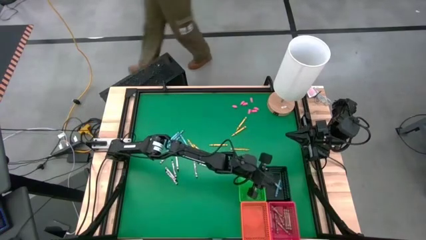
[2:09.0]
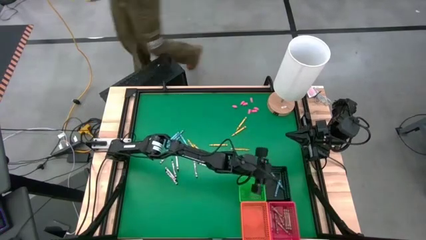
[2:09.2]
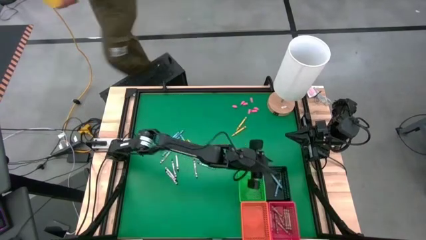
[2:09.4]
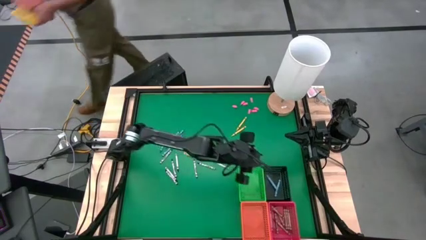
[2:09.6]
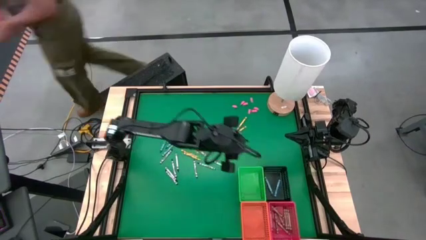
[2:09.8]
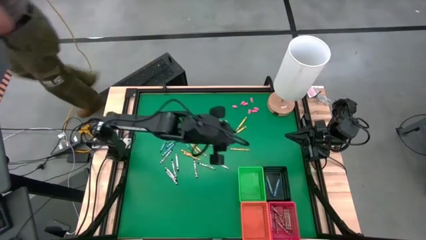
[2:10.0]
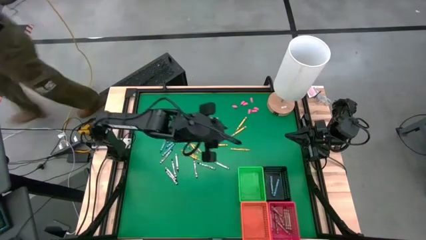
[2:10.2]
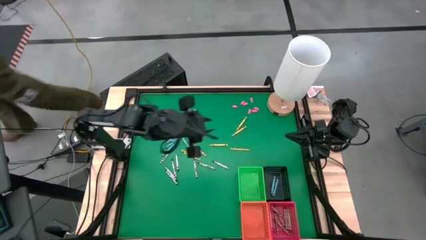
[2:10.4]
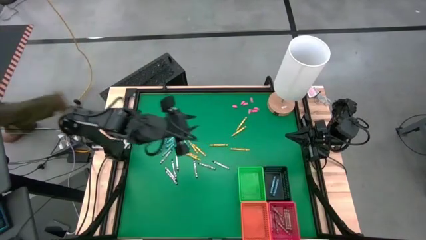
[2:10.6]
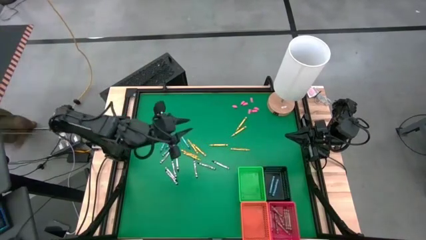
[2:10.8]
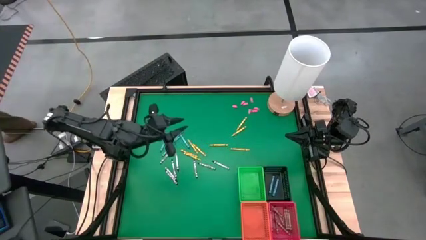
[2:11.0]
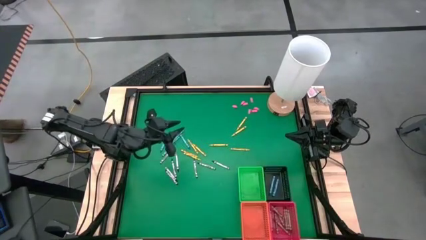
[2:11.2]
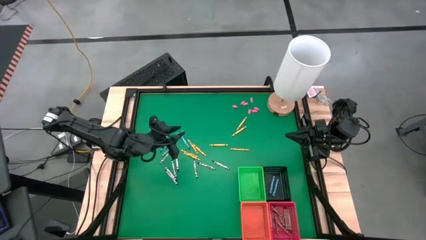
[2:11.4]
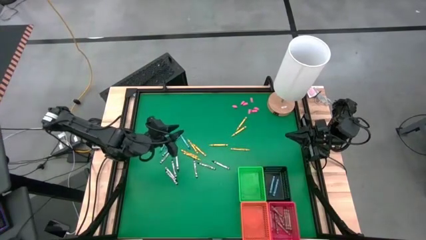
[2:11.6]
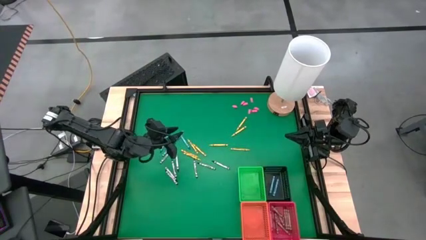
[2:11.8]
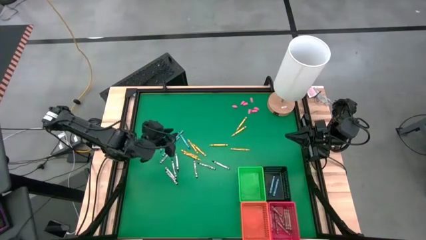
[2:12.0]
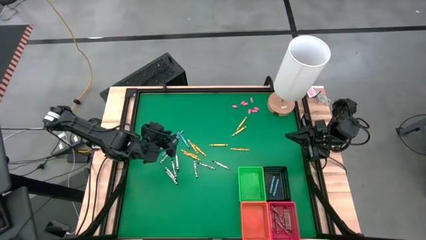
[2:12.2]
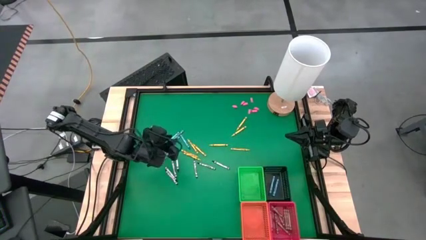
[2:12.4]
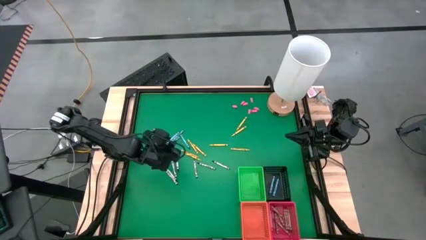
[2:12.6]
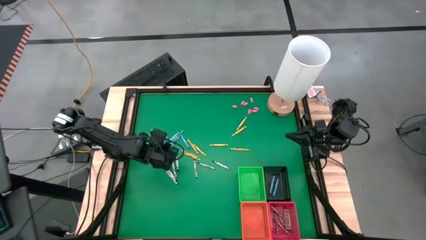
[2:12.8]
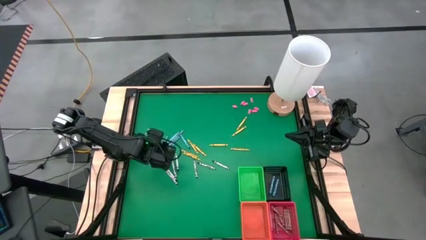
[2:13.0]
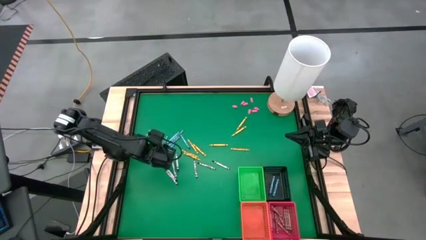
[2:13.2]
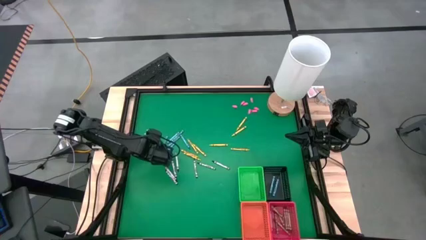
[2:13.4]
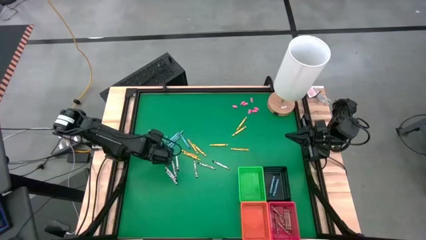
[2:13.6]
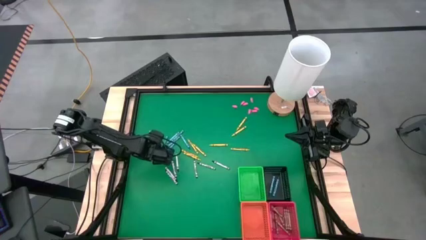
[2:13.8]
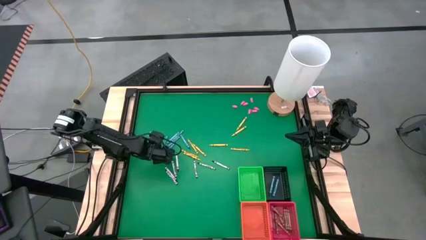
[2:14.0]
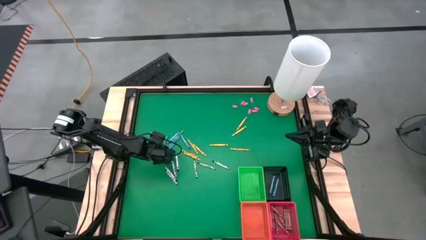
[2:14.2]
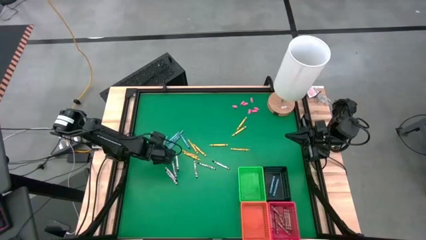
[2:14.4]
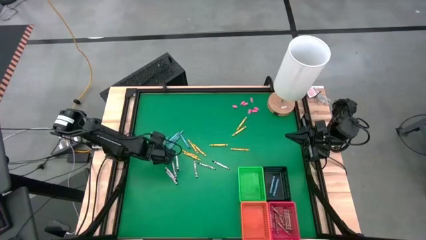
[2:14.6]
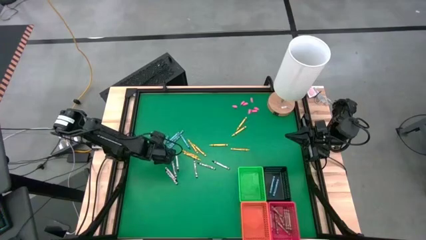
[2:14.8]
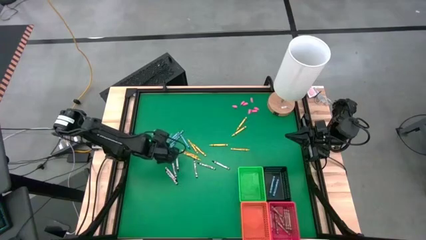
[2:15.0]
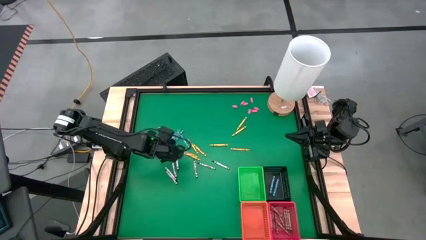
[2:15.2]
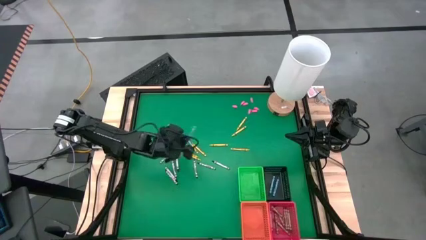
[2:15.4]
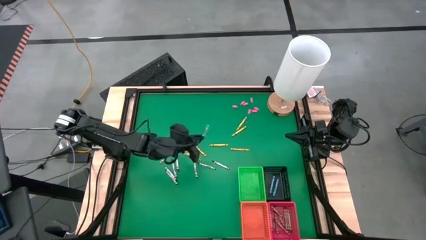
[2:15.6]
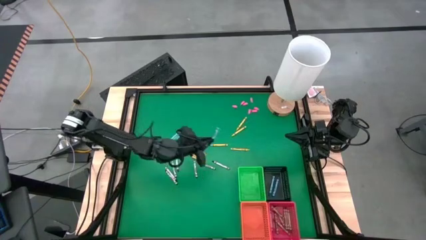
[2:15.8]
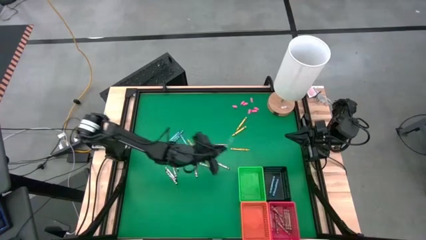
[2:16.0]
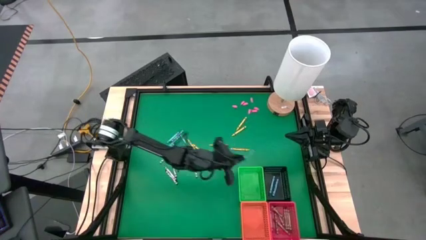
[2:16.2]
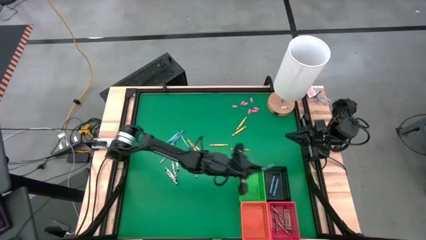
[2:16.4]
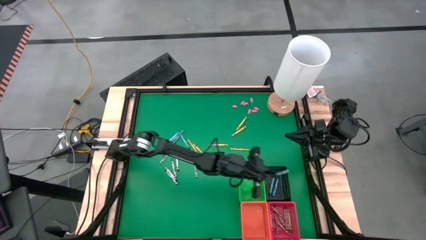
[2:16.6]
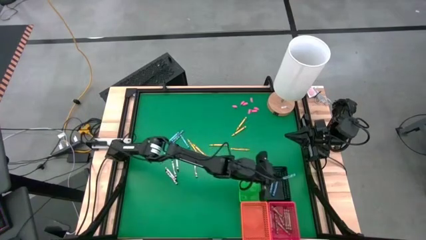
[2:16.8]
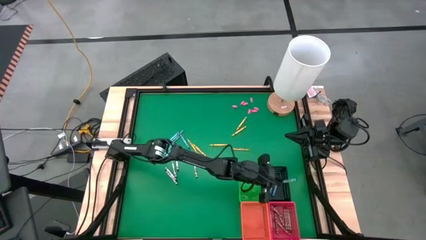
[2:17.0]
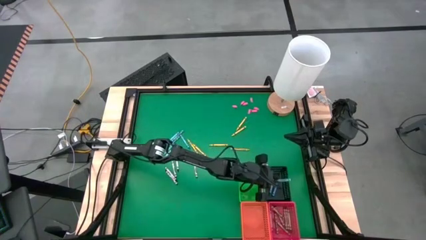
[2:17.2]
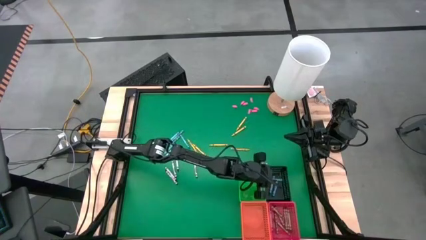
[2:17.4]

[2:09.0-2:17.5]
Task: Sort crayons
Put the blue crayon into the black bin

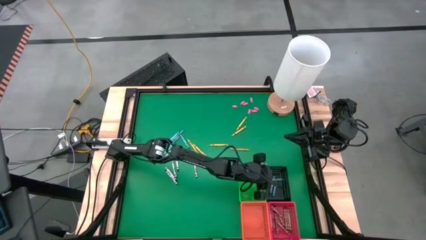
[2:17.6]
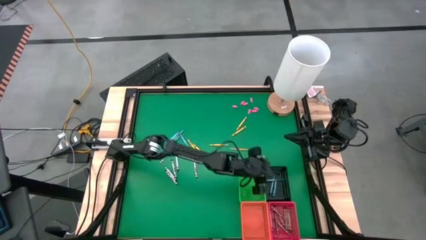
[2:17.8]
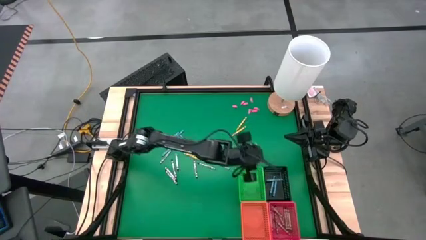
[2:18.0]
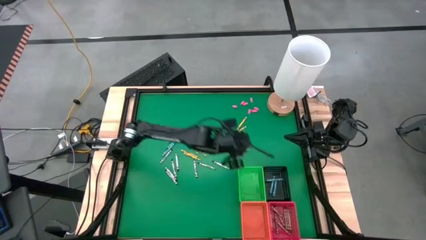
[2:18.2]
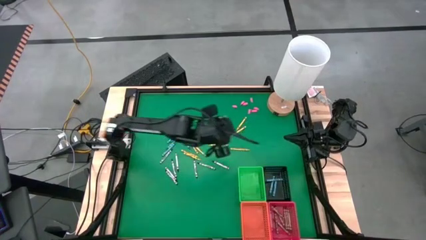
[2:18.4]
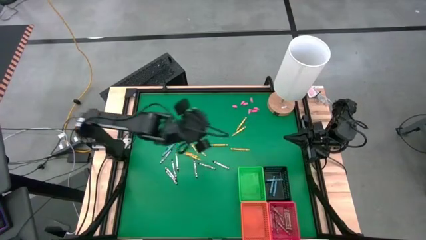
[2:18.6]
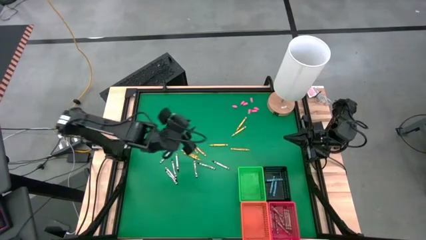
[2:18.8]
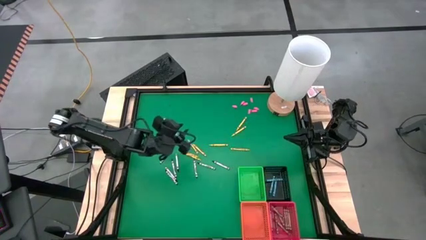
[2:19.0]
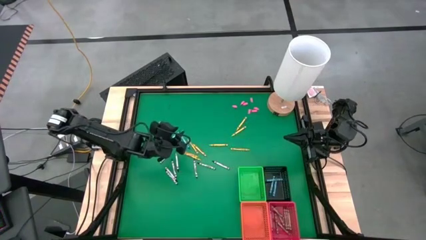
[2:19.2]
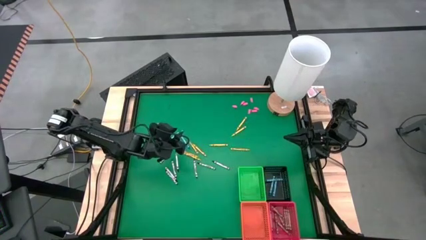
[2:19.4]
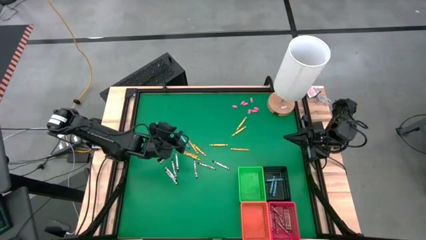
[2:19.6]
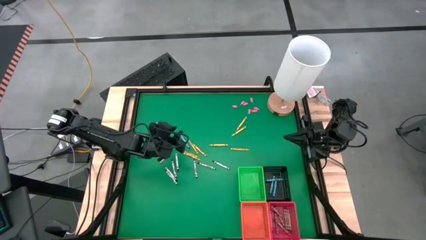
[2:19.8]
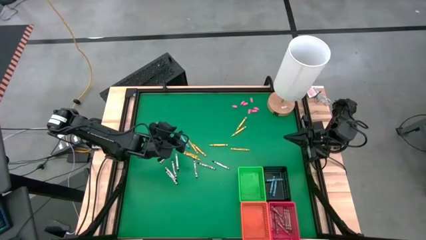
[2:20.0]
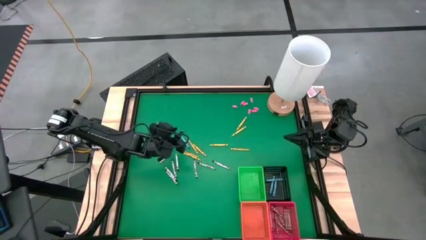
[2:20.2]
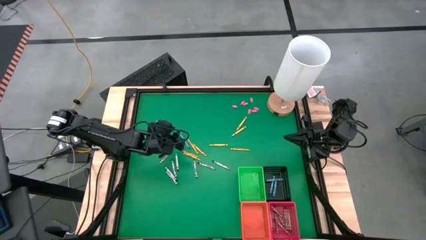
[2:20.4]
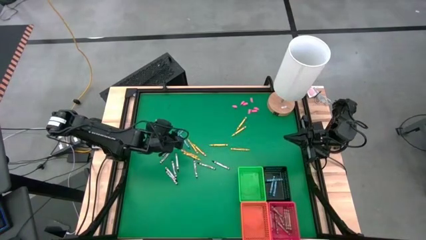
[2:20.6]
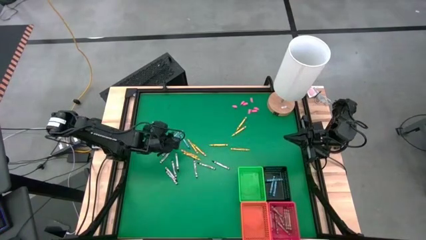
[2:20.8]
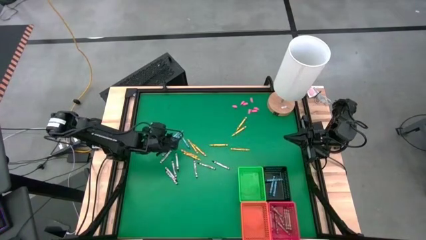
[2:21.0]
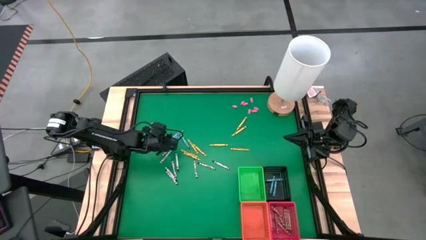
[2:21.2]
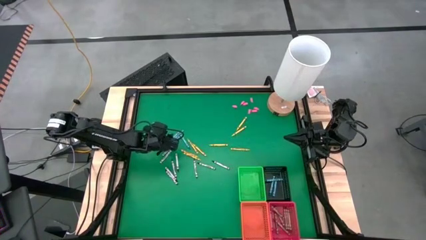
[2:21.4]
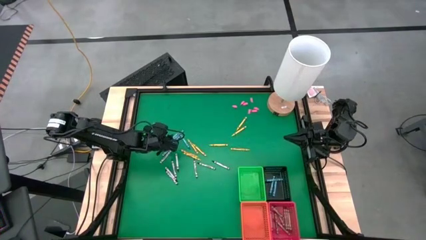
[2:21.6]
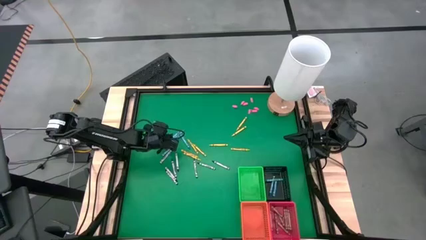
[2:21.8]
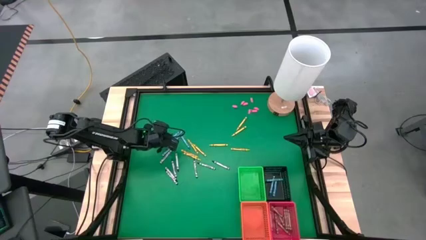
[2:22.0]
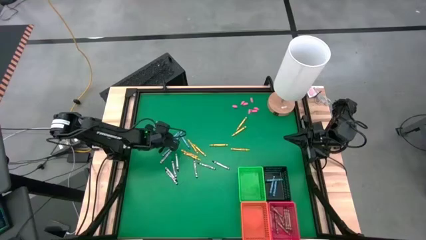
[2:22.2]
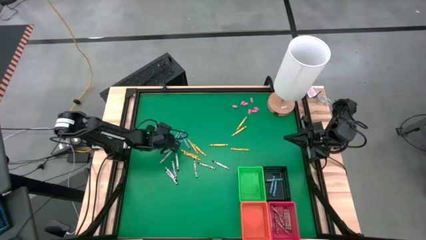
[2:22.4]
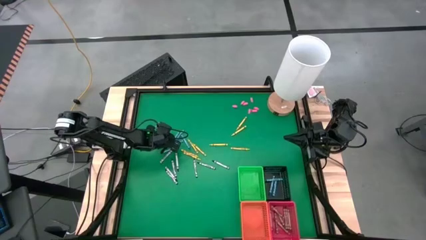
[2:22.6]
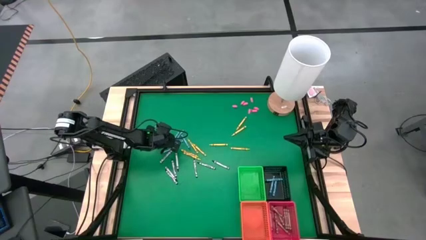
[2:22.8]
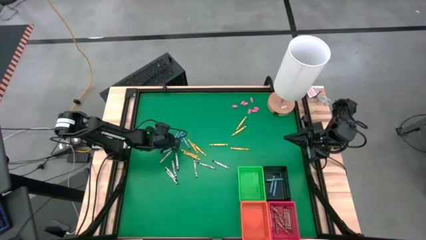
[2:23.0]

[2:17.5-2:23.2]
Put the blue crayon into the black bin

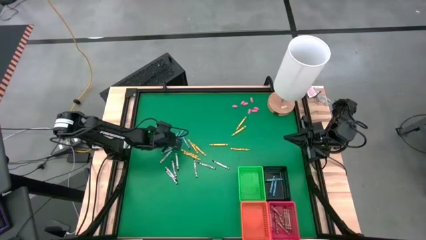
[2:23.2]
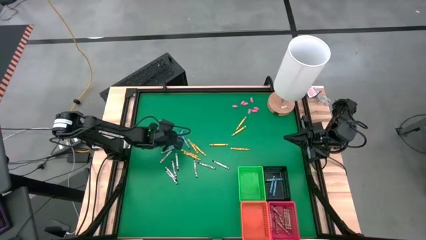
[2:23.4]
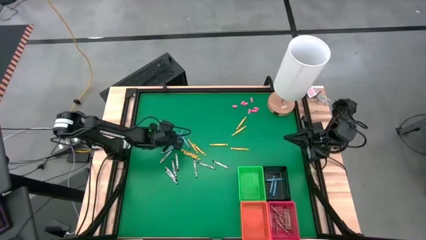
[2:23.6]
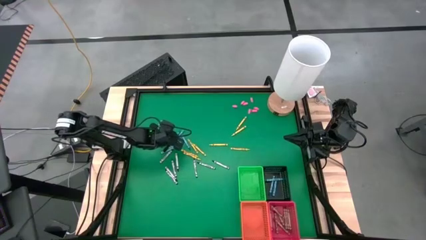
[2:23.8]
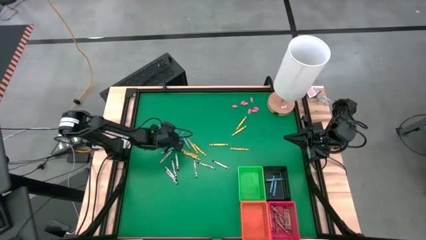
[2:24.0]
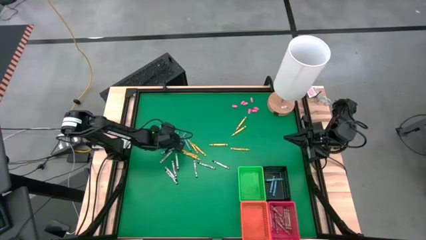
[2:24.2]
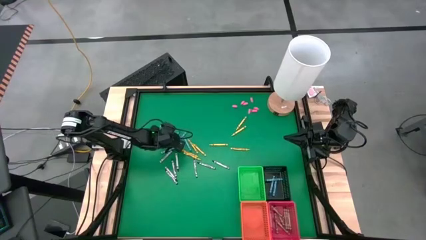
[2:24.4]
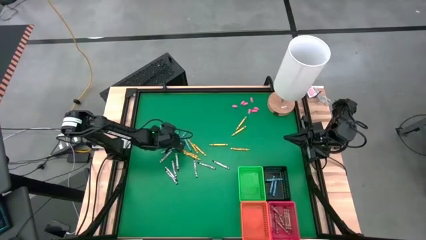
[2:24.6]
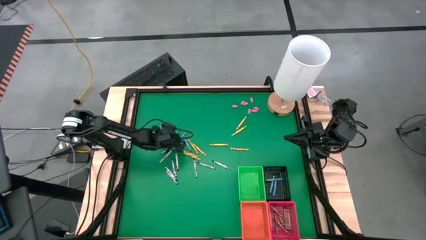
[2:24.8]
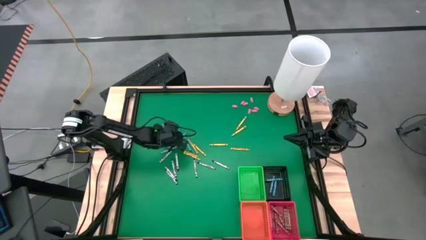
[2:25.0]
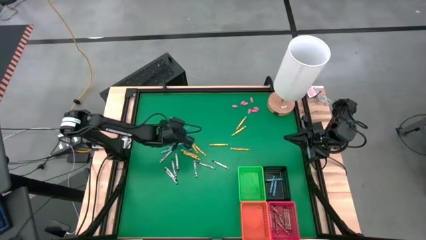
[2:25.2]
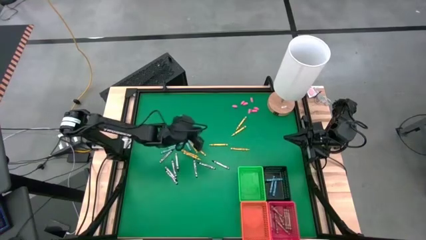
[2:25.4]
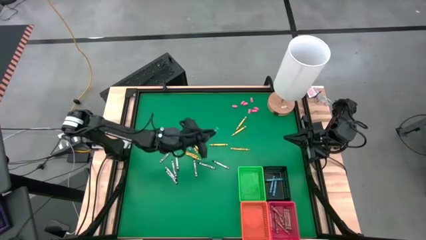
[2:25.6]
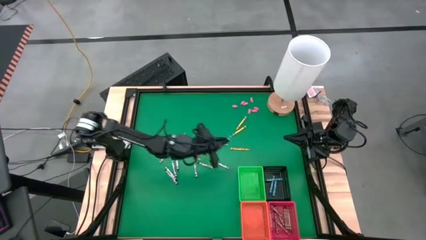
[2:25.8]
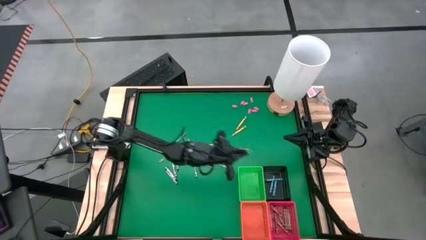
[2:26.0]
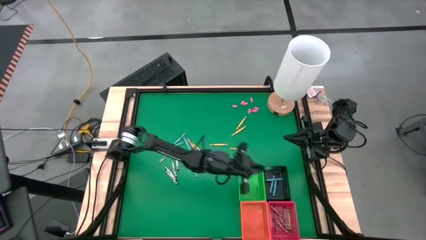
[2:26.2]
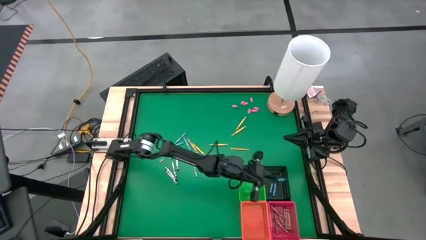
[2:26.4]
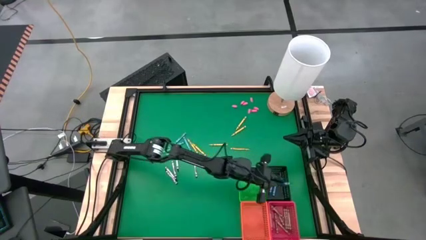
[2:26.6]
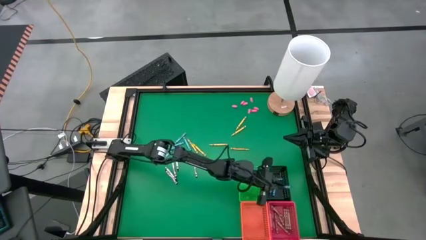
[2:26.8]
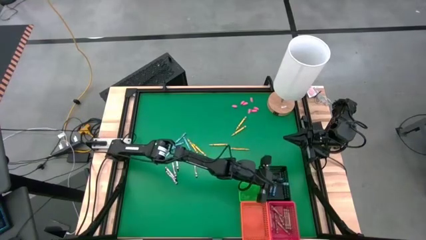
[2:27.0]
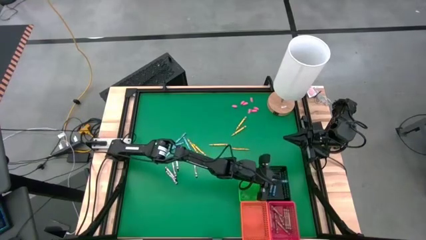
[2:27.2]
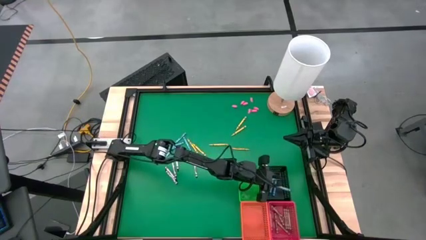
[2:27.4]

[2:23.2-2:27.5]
Put the blue crayon into the black bin
